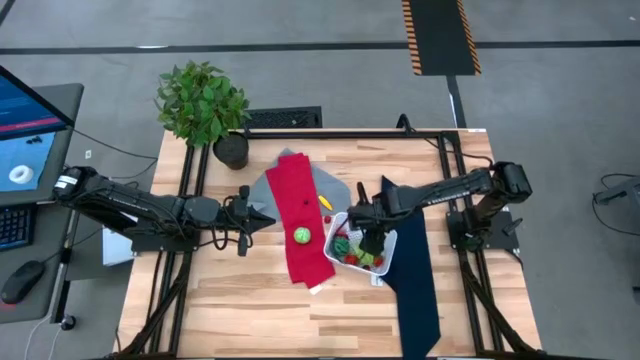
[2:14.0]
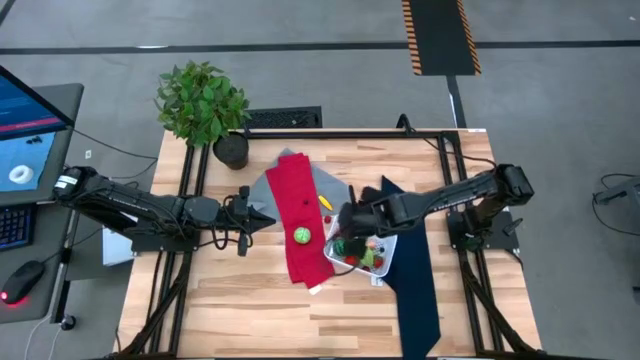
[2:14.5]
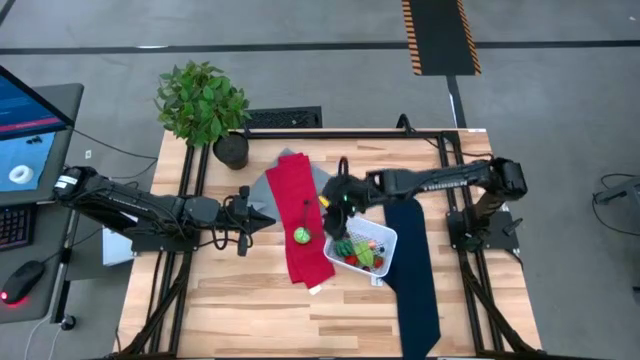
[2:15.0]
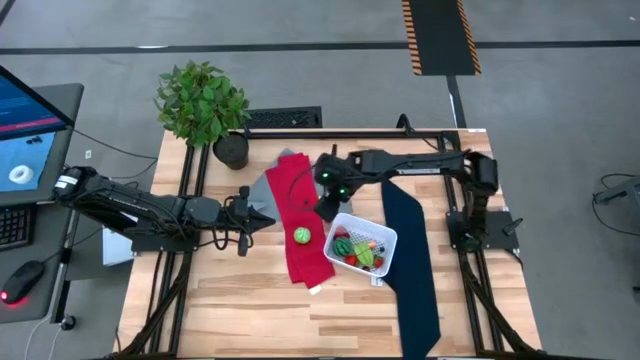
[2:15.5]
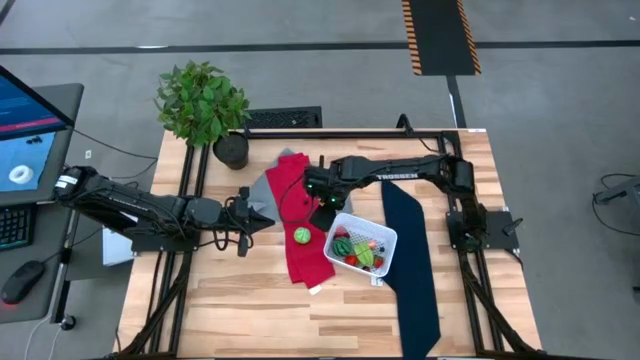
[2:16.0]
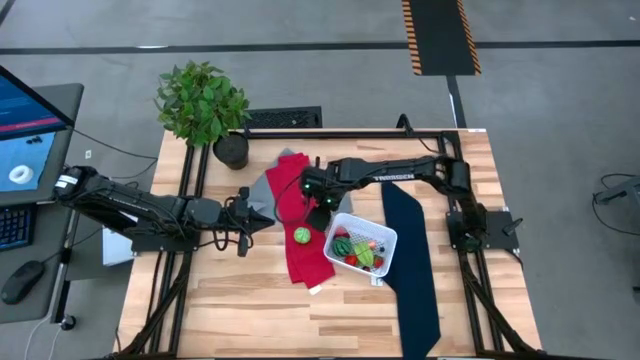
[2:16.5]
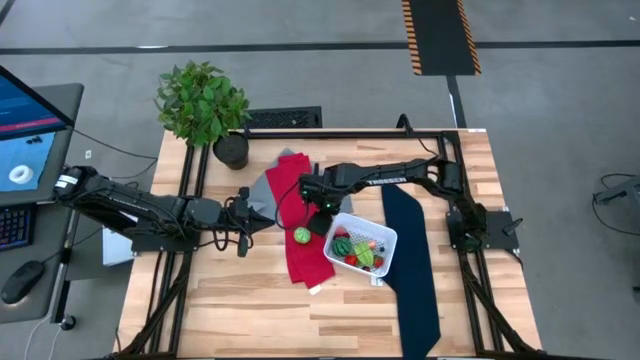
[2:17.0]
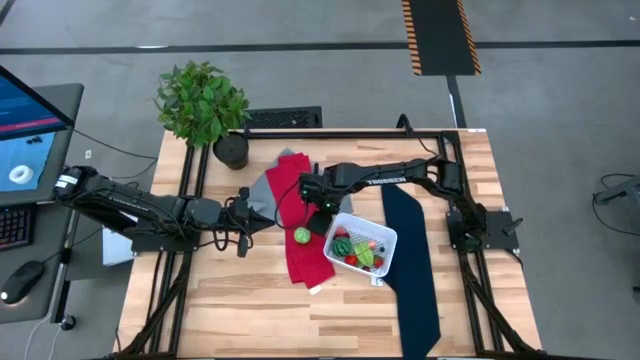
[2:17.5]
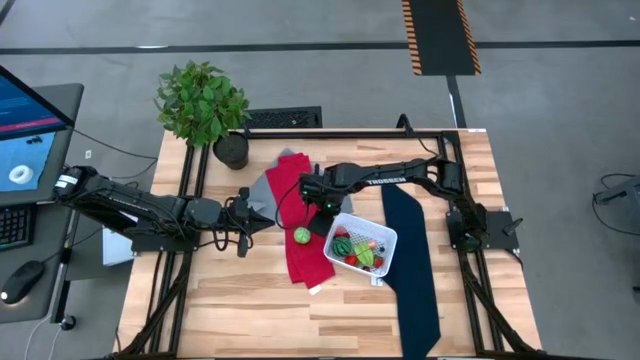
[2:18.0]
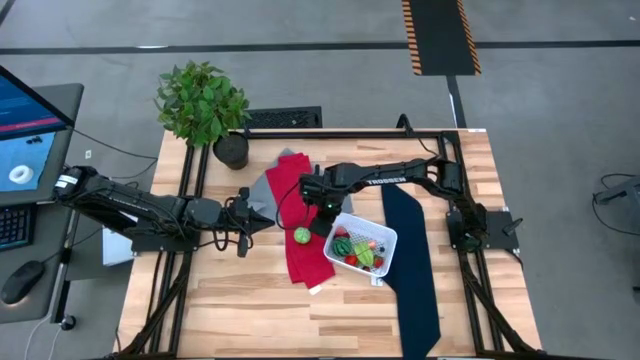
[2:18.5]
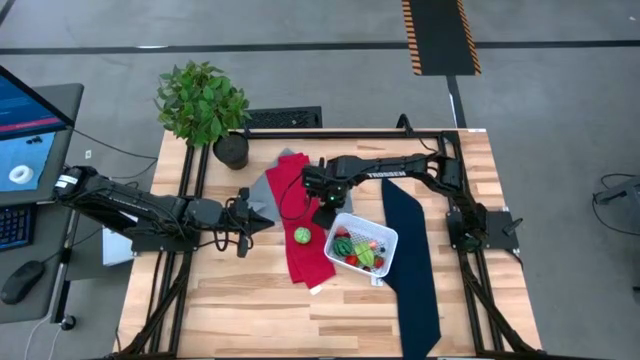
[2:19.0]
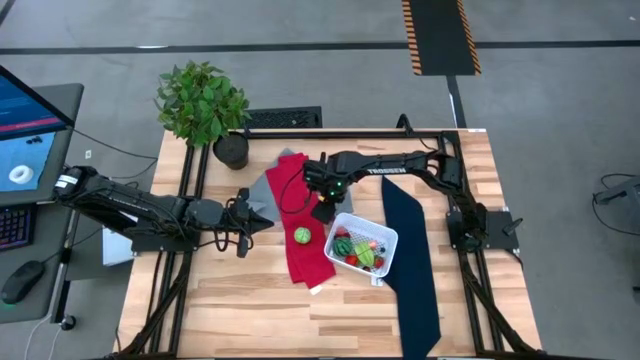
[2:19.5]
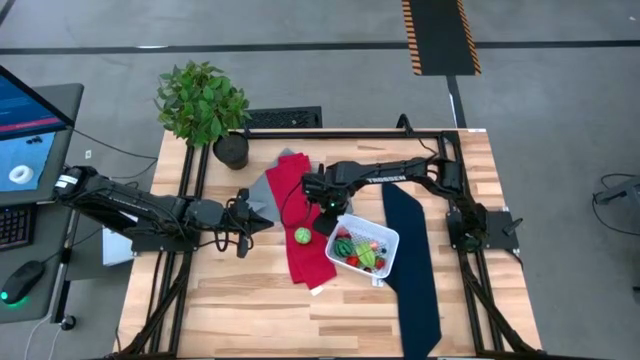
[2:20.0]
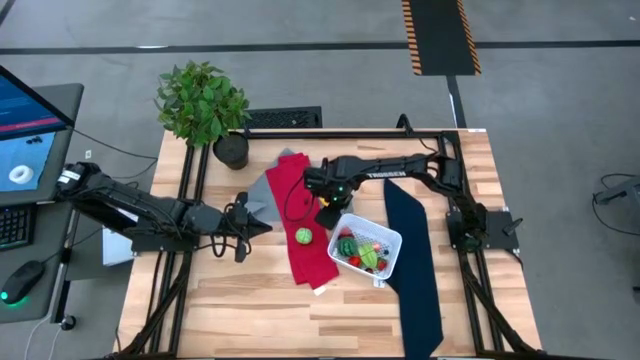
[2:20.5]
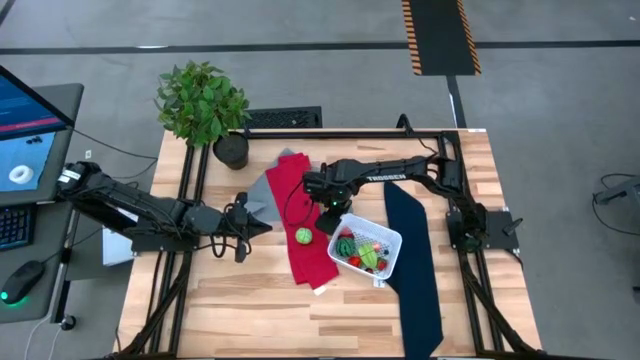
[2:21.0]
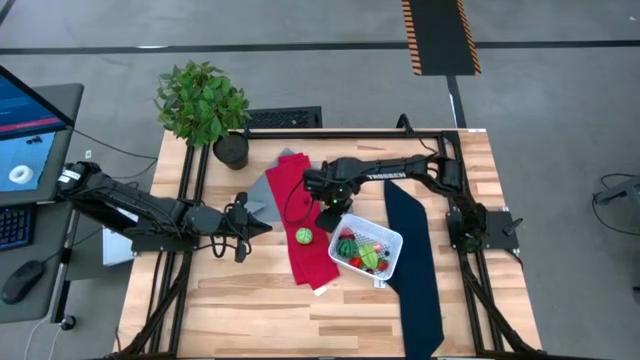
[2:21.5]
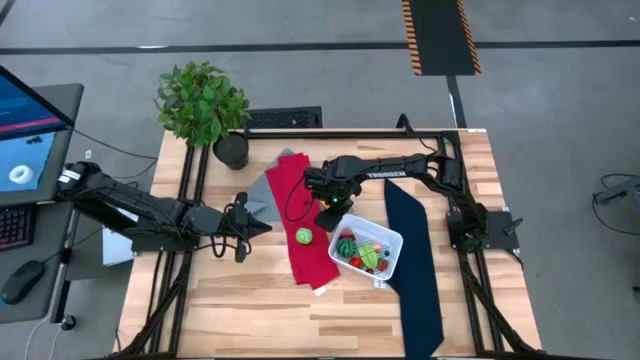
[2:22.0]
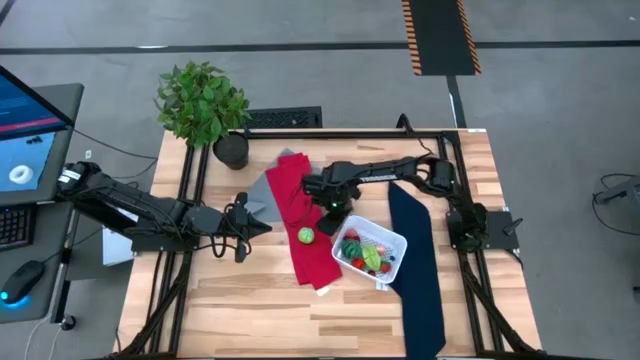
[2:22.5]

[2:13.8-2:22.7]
Task: Pick and placing Produce into tupperware
Put the cherry into the white bin

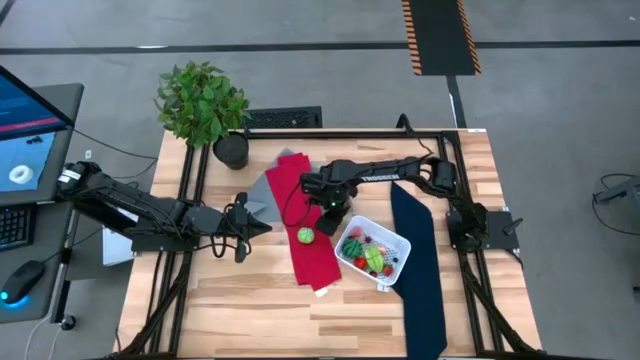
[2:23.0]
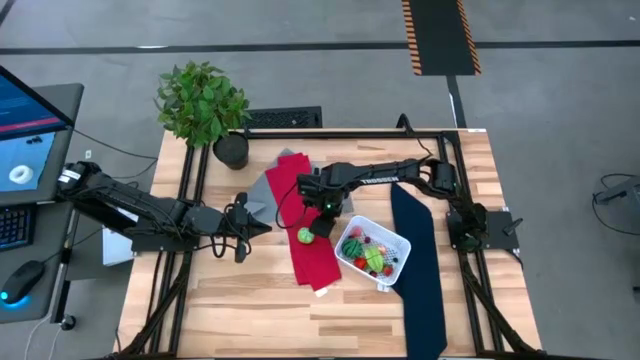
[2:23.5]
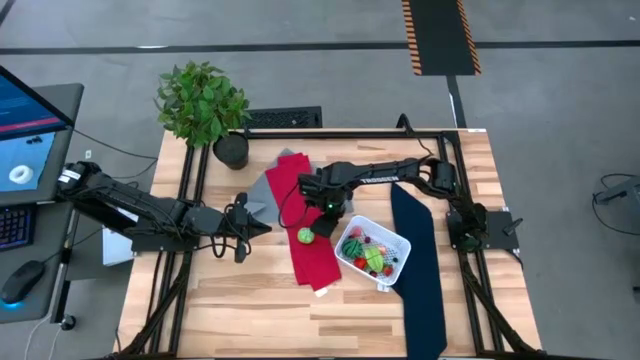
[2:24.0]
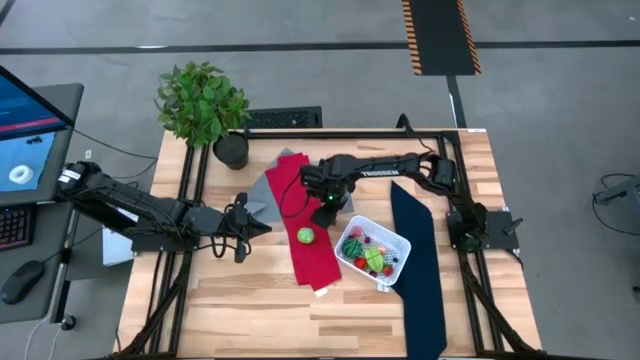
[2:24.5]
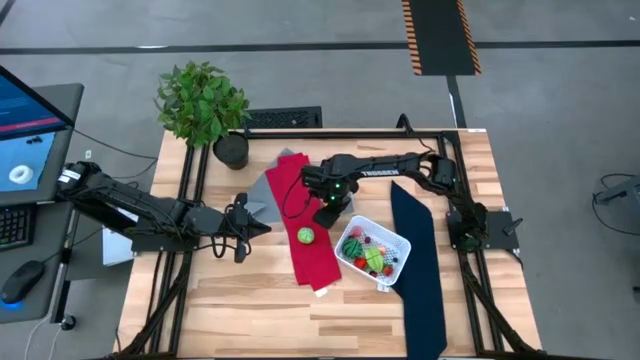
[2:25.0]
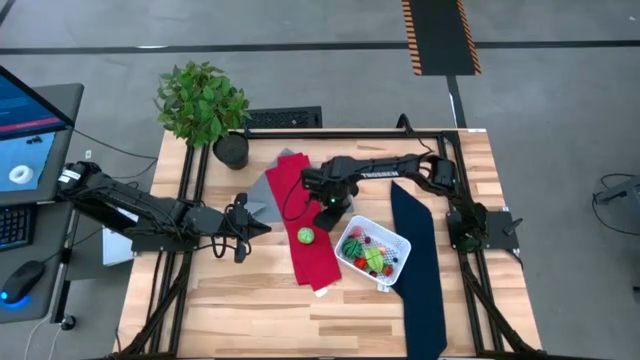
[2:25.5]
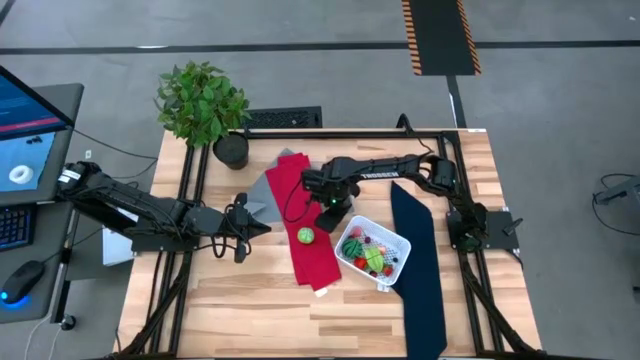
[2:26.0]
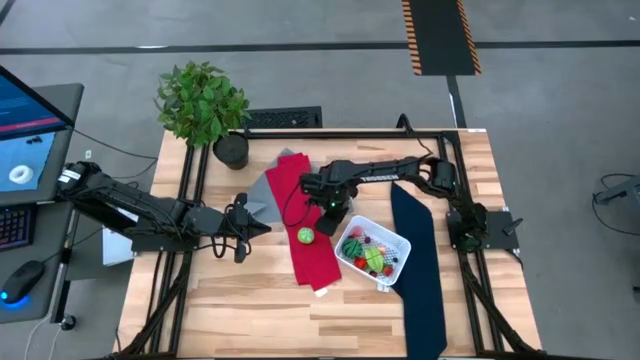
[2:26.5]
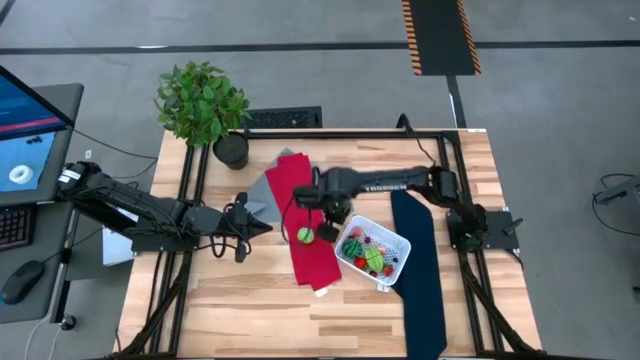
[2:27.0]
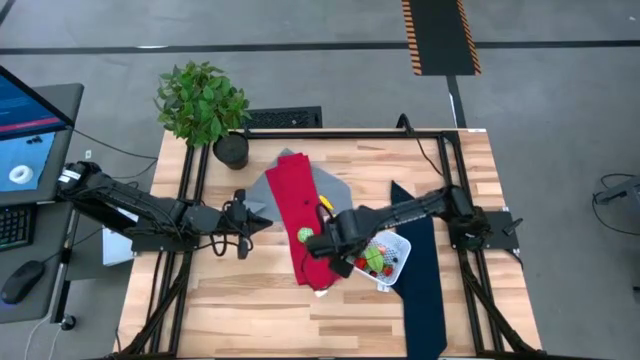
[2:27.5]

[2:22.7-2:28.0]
Put the cherry into the white bin

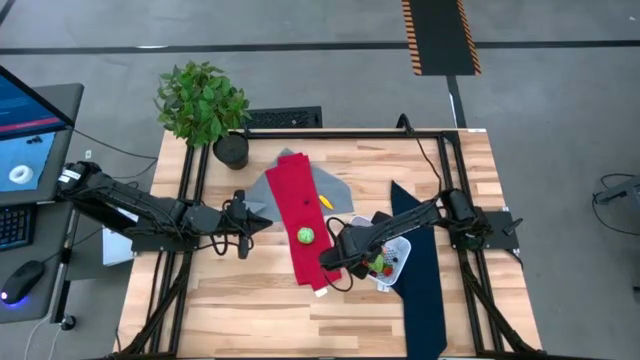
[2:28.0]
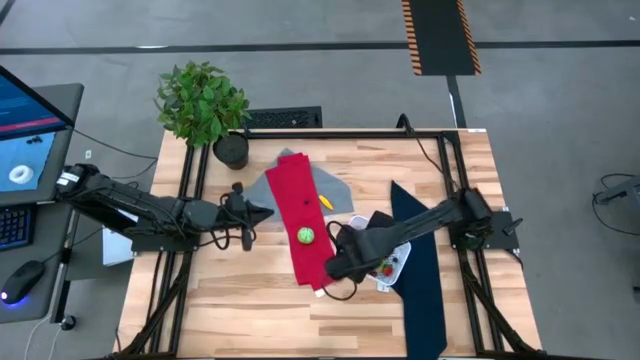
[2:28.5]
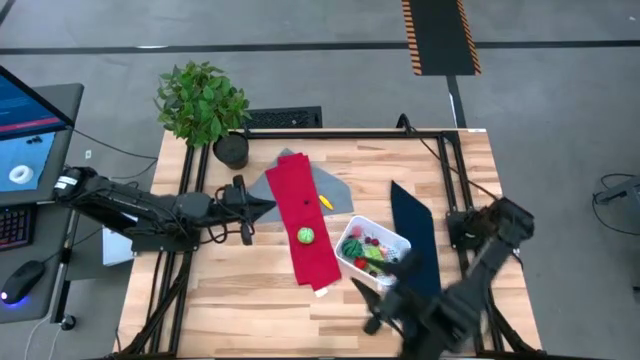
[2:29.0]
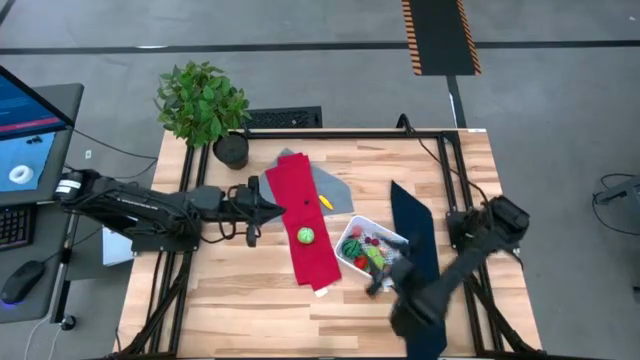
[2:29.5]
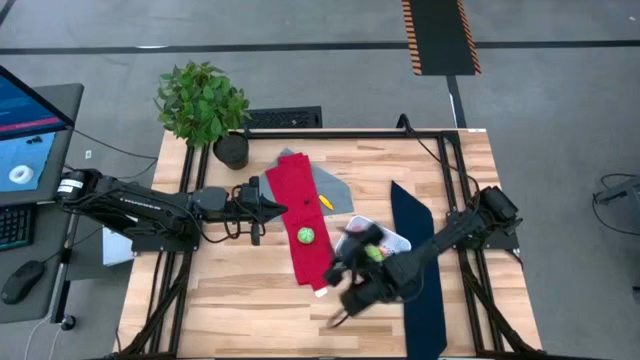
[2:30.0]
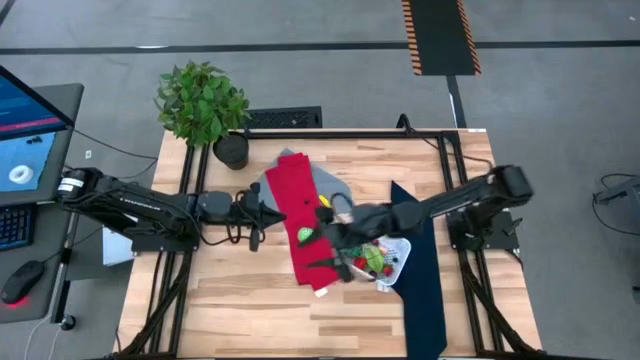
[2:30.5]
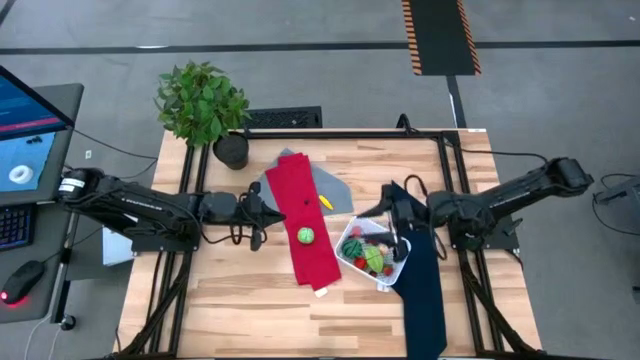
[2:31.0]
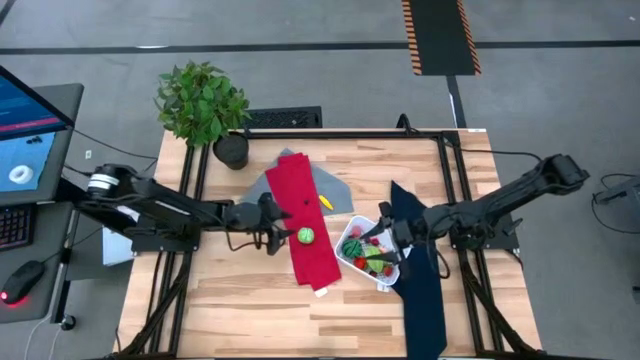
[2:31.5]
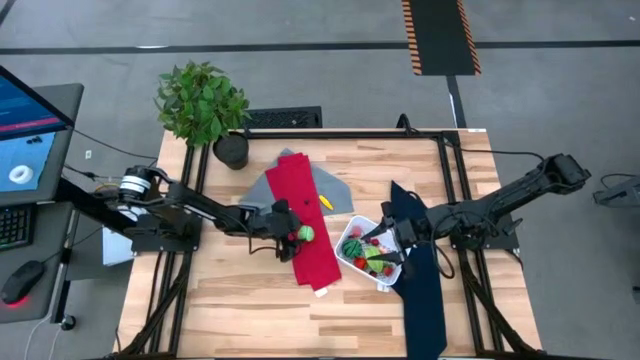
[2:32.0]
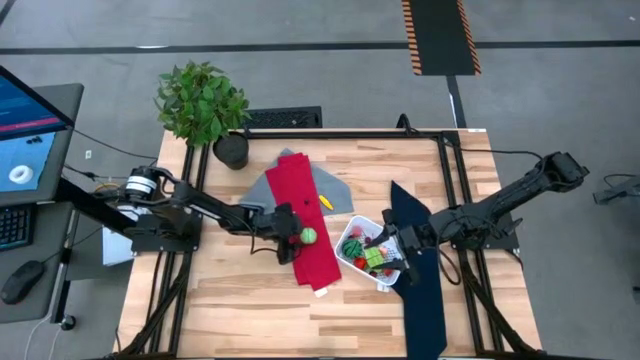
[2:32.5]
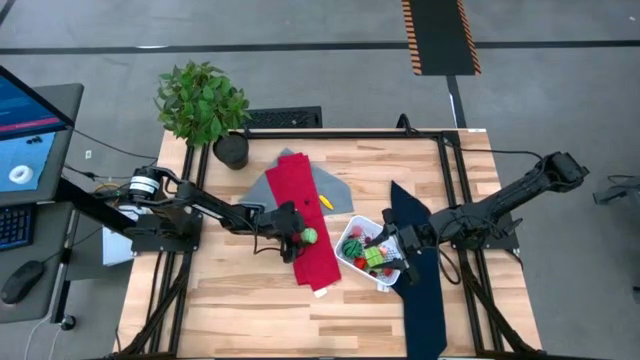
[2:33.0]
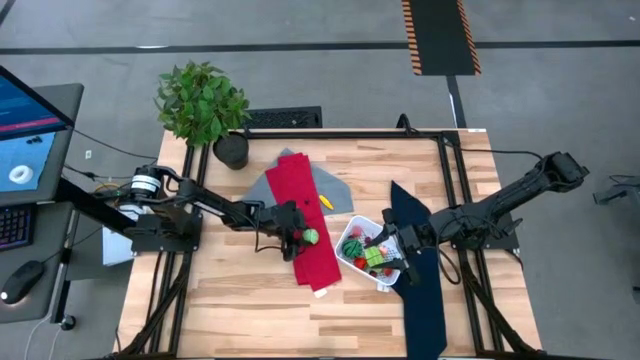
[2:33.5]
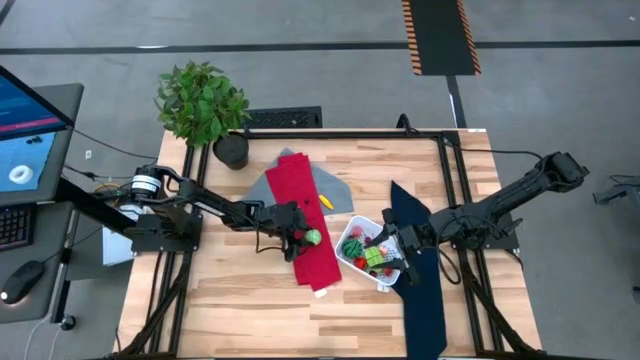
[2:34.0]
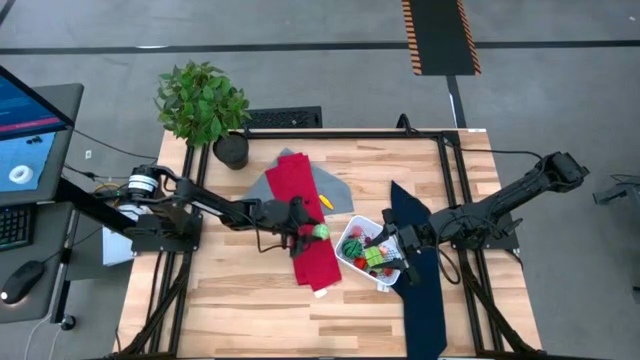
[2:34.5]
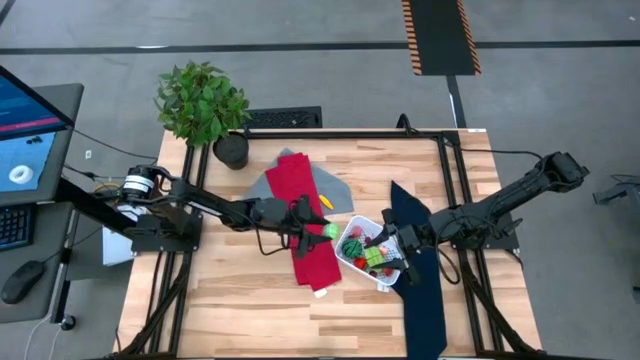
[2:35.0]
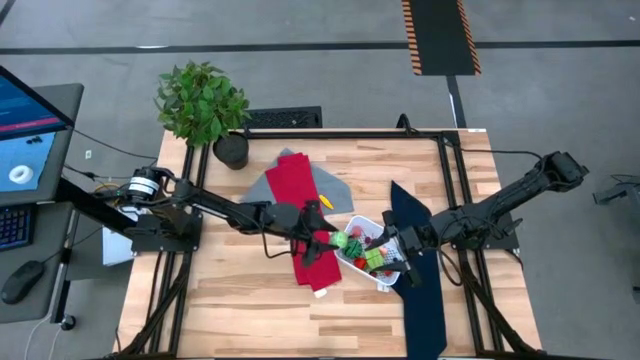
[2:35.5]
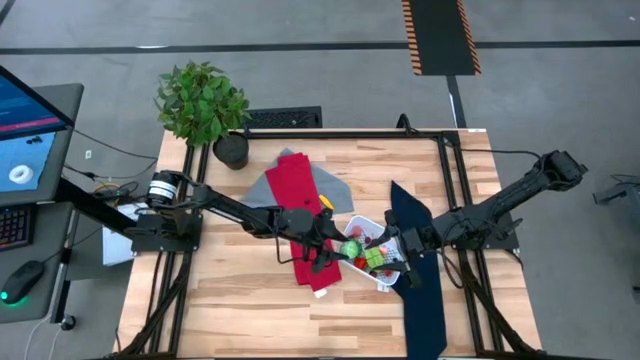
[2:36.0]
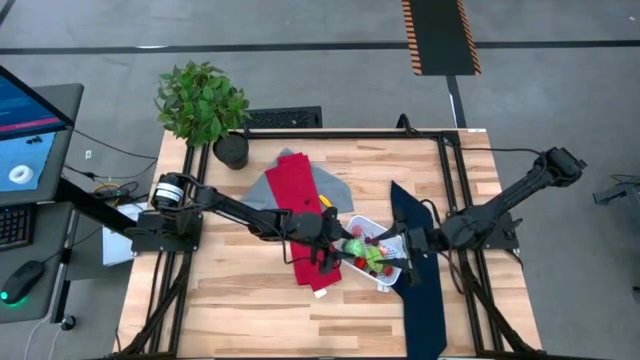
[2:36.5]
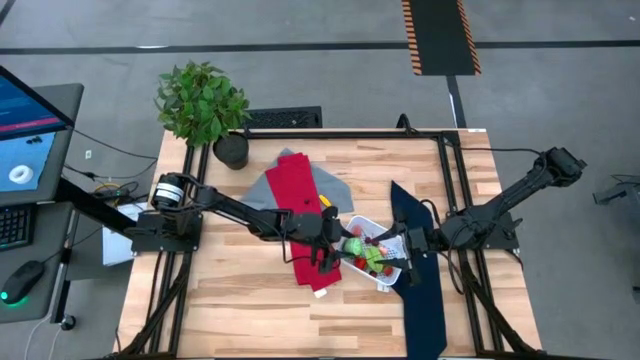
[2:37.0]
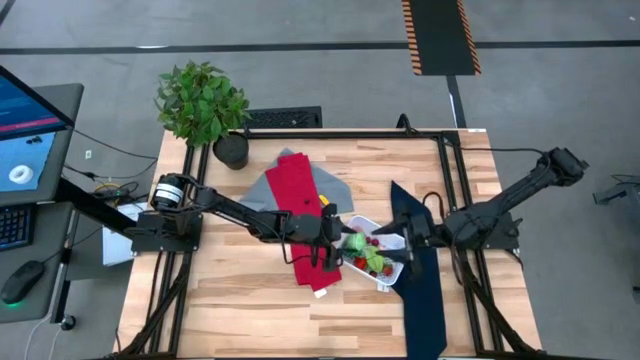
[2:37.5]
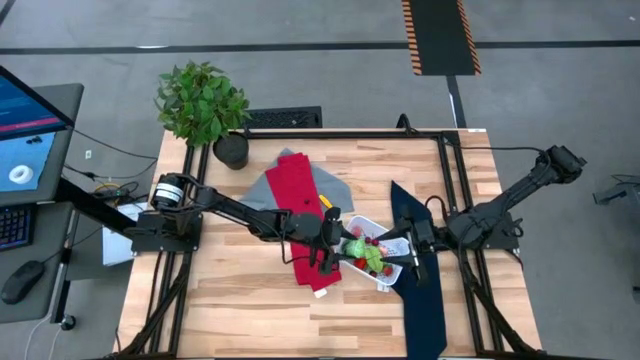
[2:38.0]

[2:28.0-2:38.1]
Put the cabbage into the white bin
